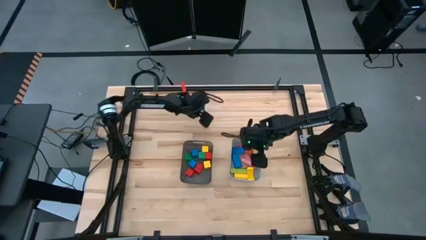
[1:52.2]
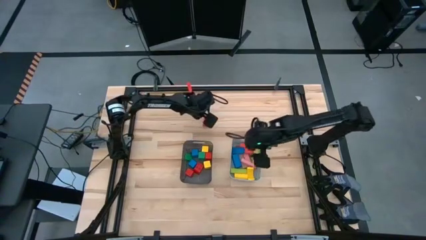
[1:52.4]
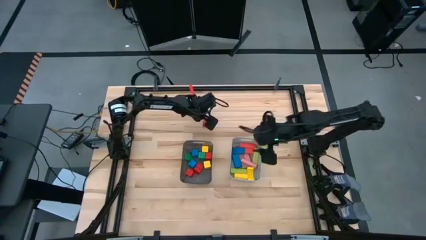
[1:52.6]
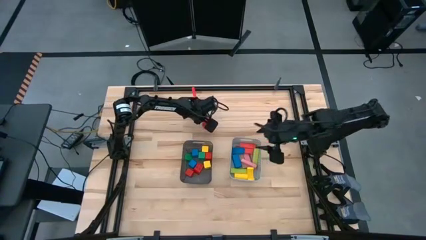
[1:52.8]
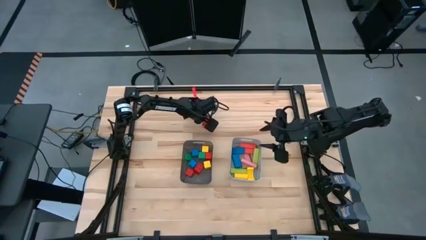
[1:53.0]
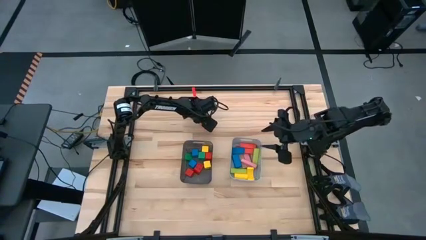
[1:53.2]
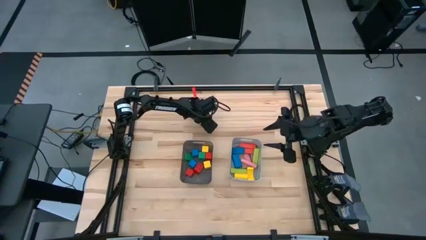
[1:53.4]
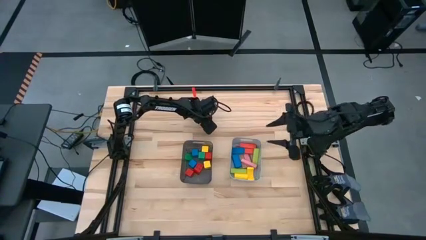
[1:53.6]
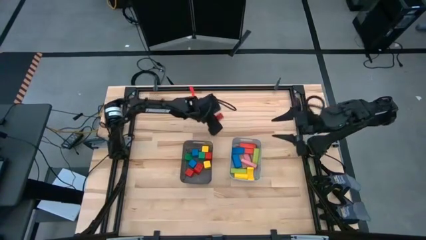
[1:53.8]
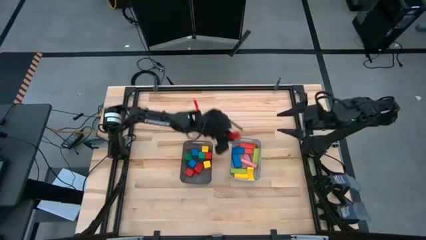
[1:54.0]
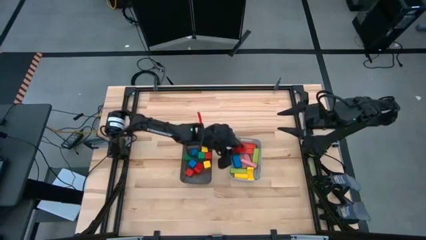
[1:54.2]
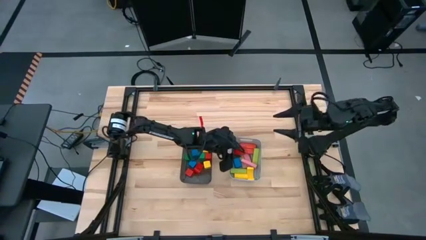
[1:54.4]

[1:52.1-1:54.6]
Task: Sort blocks by size
Put the large red block into the gray bin

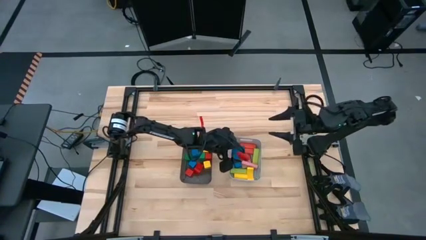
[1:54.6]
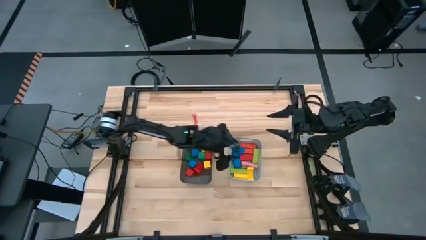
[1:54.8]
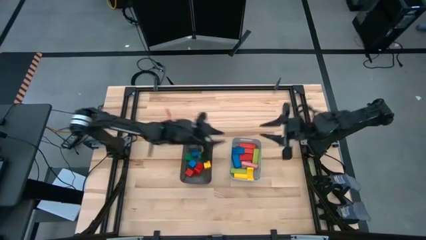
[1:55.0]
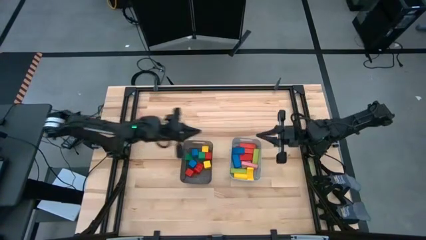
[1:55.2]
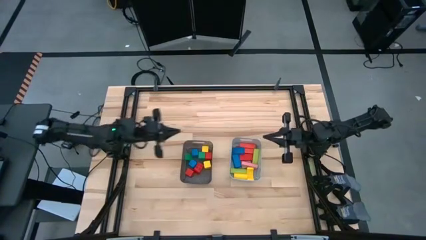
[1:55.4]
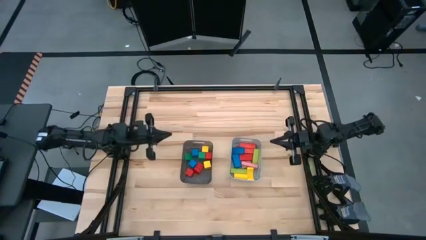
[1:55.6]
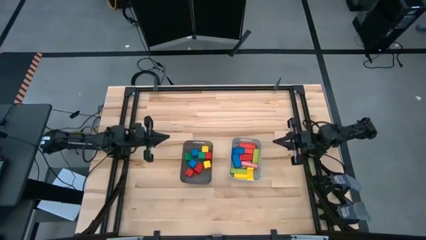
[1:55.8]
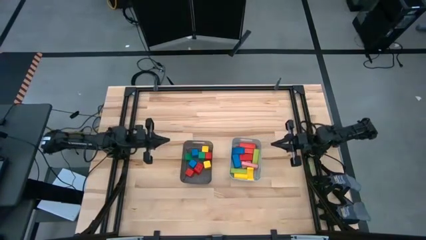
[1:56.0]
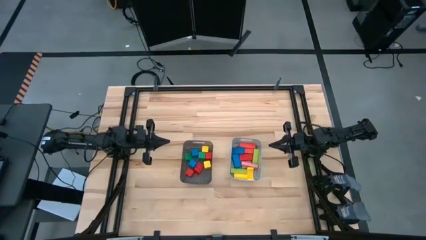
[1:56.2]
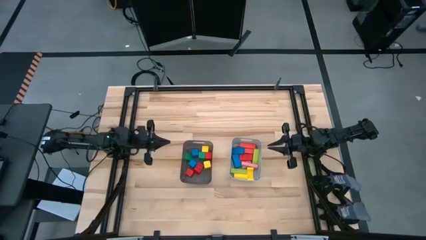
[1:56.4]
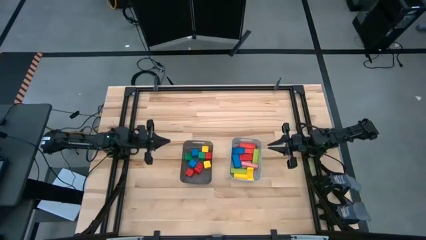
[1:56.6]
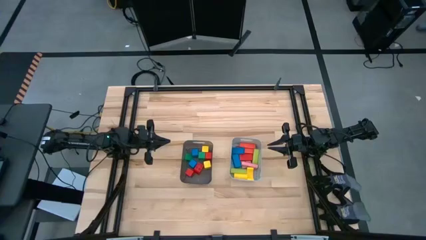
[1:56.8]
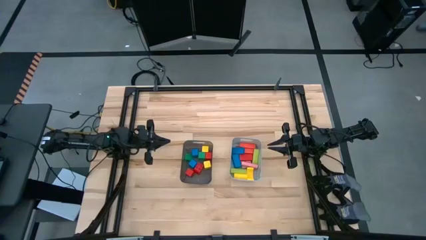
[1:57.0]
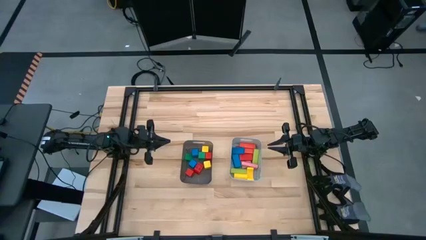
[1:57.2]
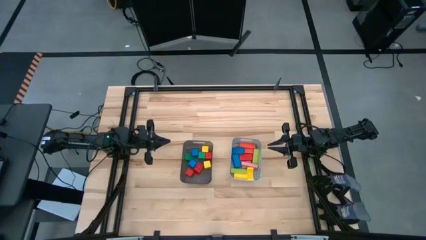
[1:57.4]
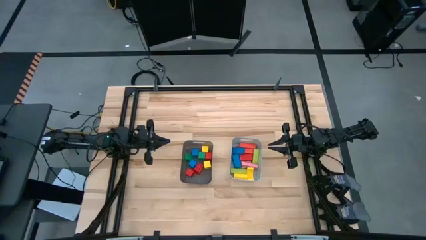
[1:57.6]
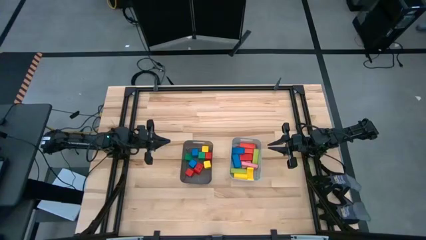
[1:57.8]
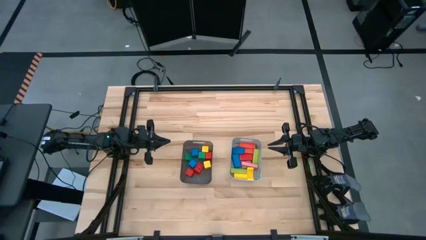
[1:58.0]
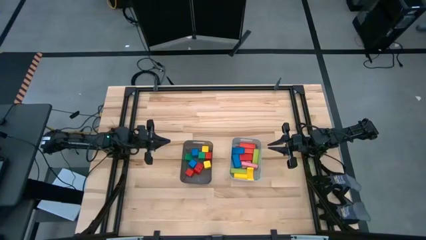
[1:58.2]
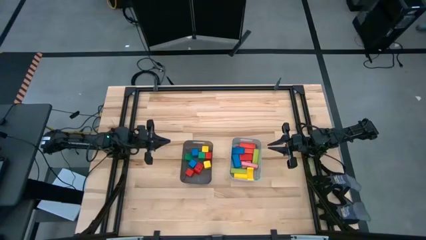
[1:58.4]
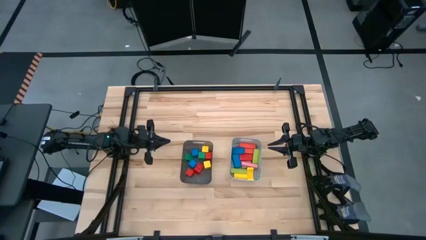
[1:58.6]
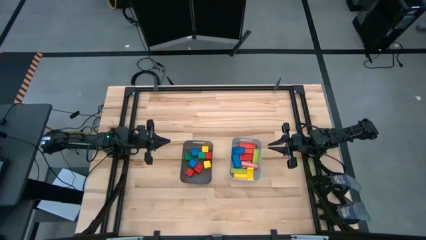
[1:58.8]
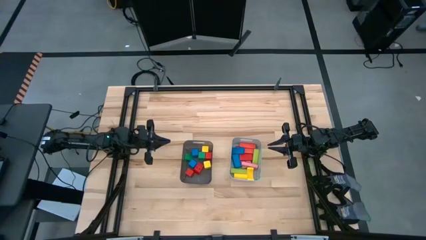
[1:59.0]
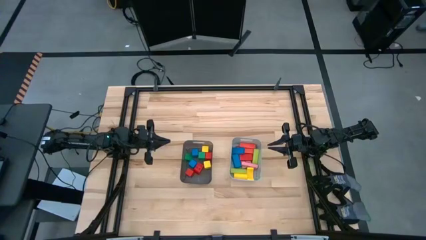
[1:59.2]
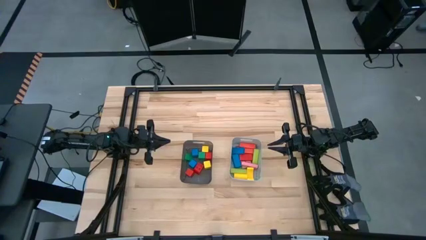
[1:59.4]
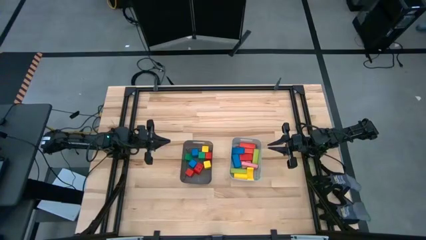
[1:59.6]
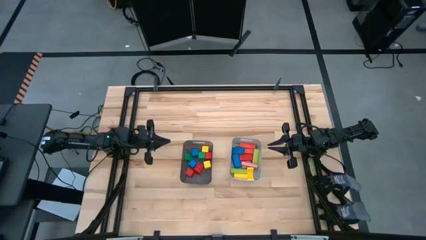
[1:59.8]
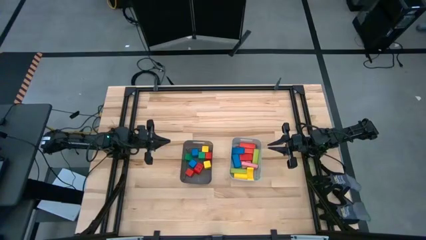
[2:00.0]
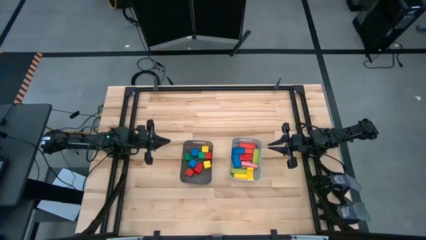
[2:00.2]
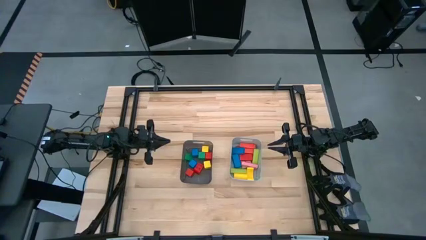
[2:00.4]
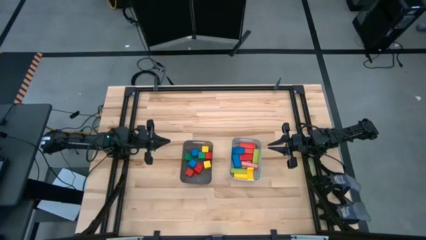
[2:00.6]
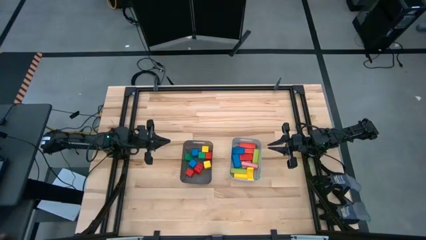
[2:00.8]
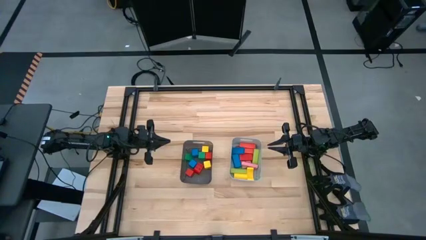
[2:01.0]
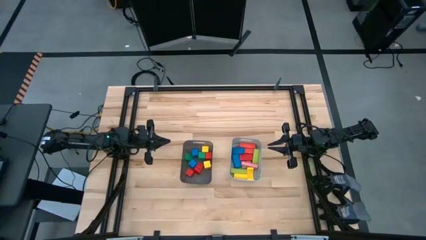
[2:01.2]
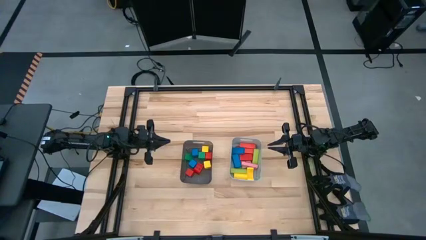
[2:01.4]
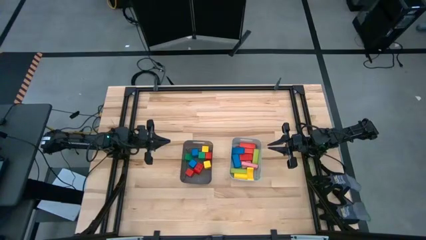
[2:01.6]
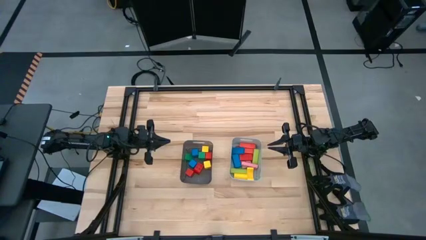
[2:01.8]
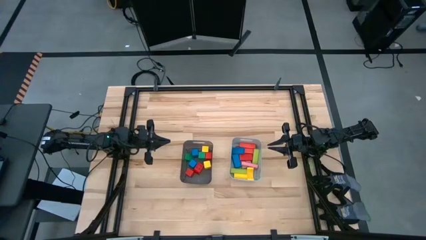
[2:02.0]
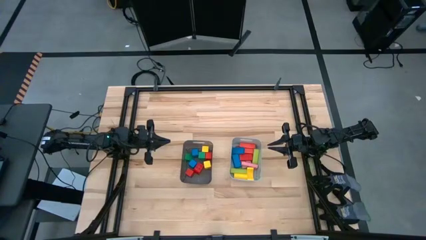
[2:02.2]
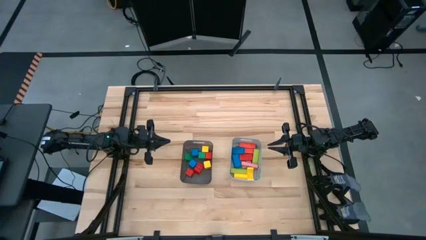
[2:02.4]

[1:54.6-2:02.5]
Return to Home Position

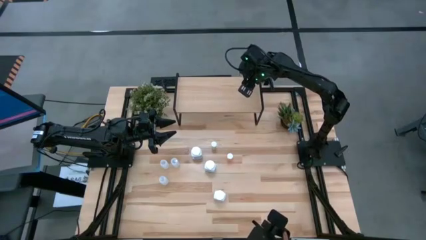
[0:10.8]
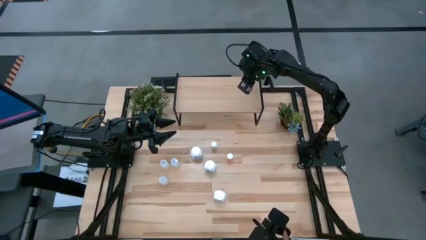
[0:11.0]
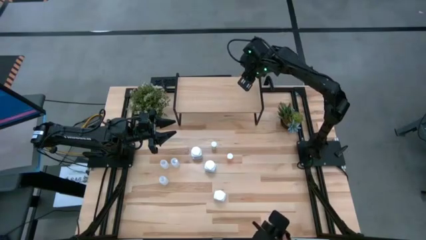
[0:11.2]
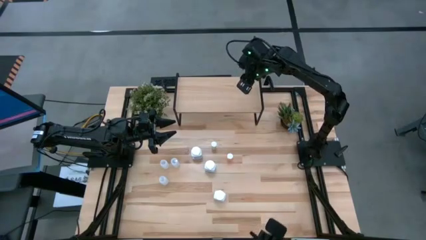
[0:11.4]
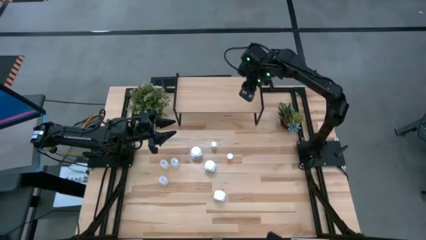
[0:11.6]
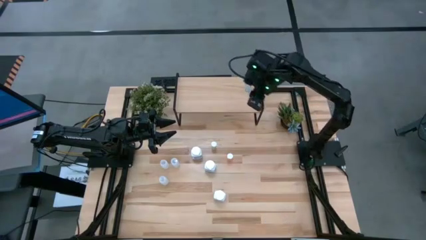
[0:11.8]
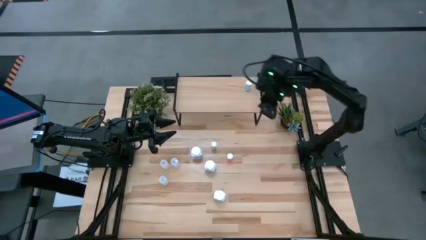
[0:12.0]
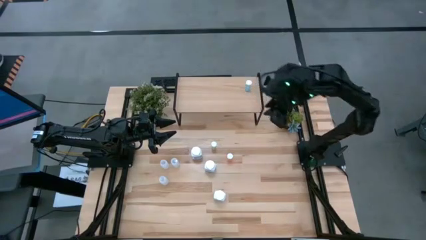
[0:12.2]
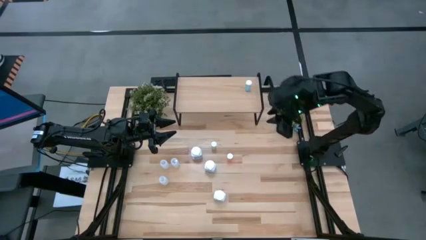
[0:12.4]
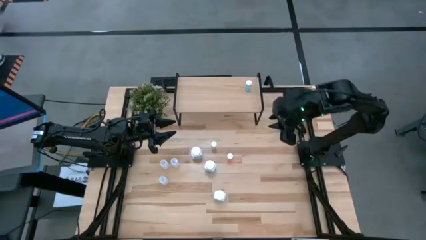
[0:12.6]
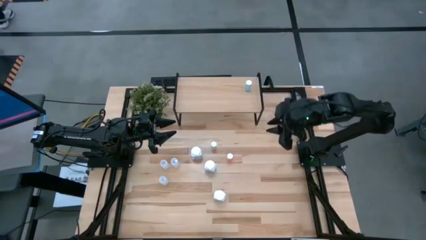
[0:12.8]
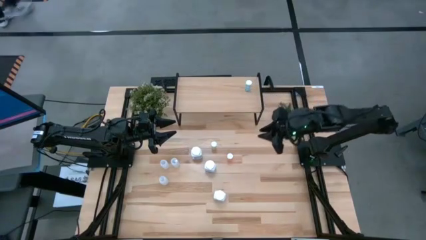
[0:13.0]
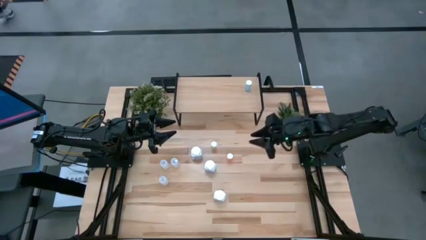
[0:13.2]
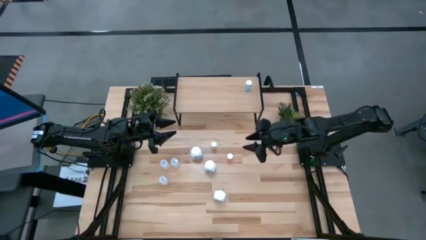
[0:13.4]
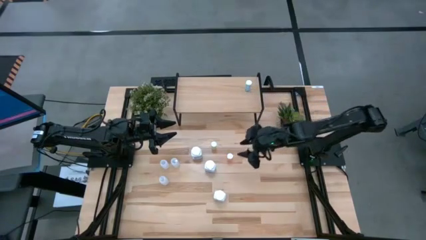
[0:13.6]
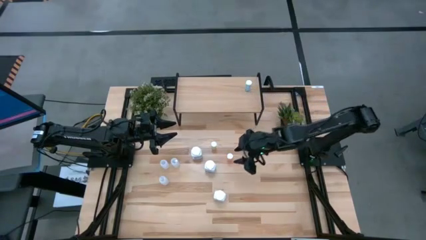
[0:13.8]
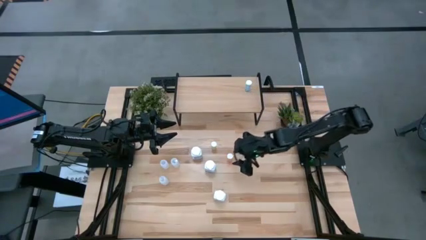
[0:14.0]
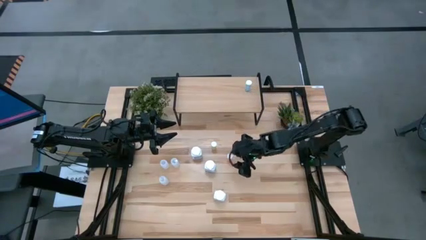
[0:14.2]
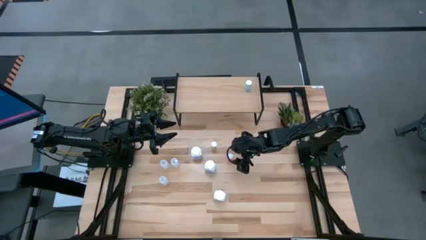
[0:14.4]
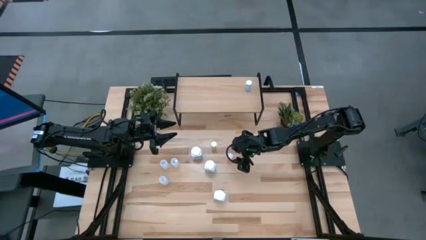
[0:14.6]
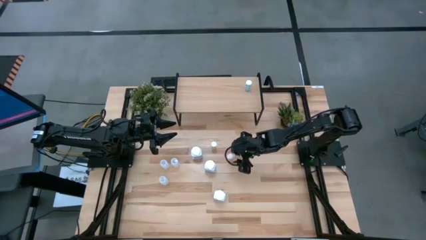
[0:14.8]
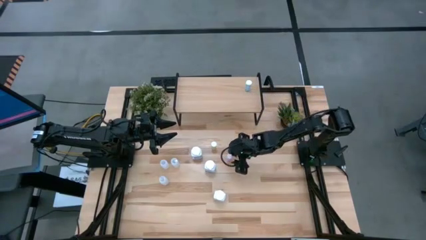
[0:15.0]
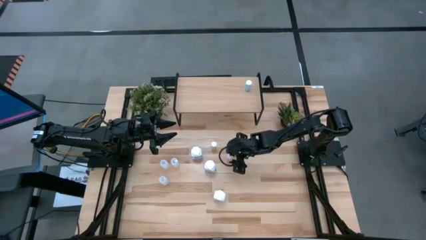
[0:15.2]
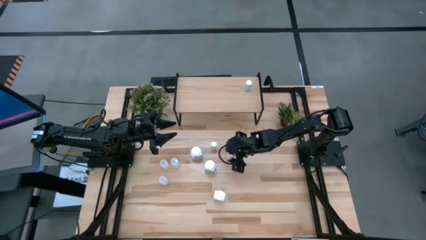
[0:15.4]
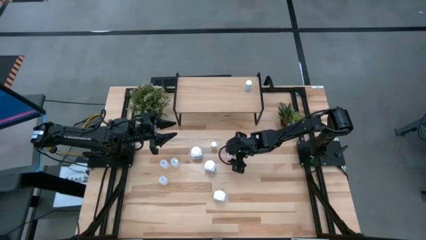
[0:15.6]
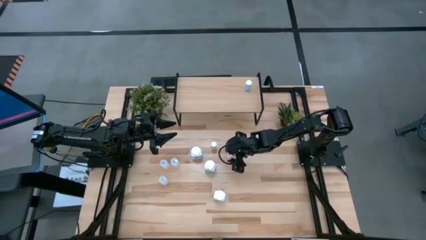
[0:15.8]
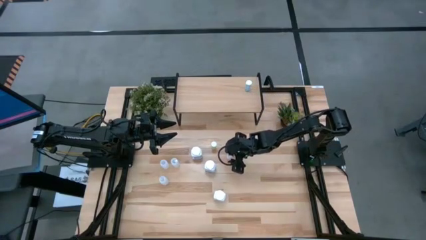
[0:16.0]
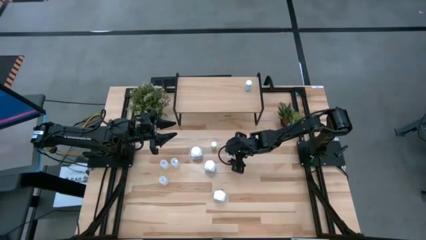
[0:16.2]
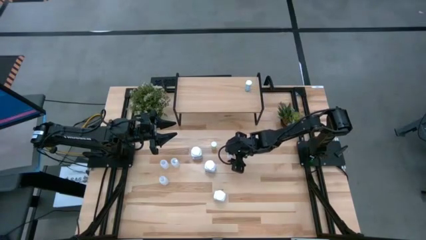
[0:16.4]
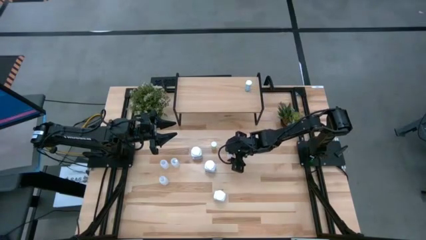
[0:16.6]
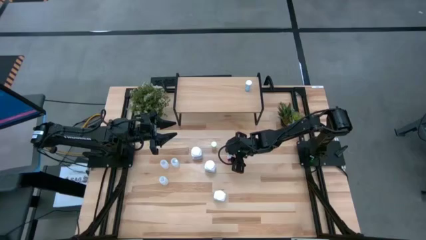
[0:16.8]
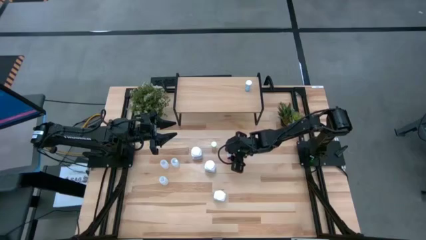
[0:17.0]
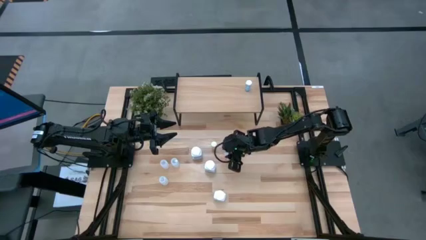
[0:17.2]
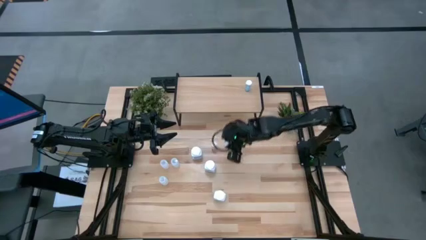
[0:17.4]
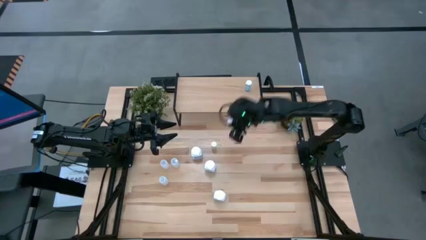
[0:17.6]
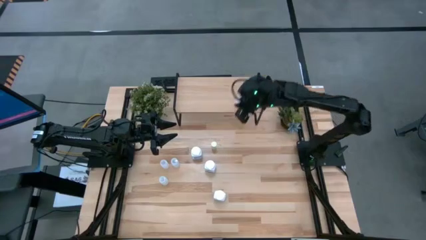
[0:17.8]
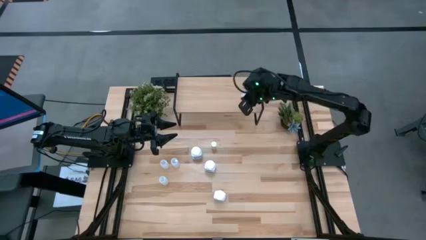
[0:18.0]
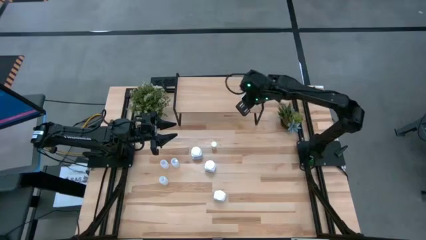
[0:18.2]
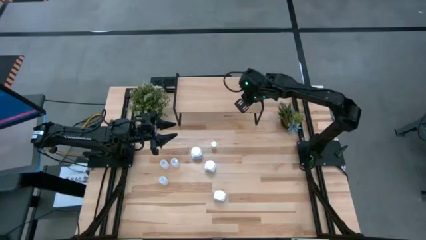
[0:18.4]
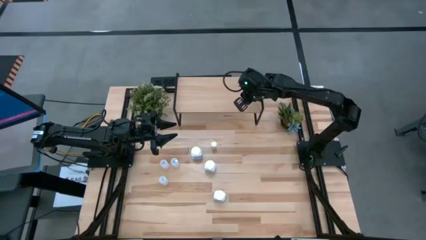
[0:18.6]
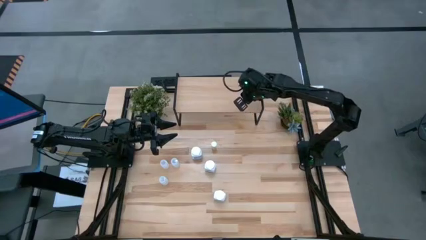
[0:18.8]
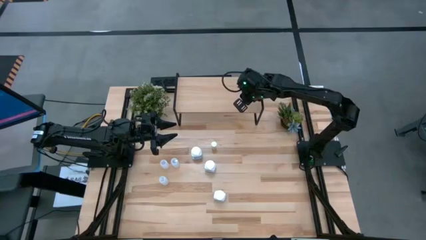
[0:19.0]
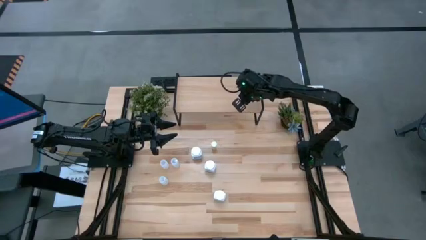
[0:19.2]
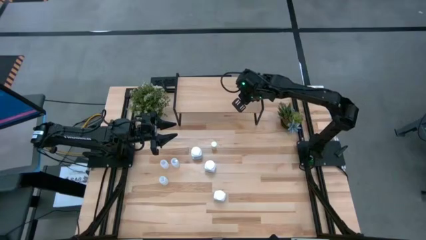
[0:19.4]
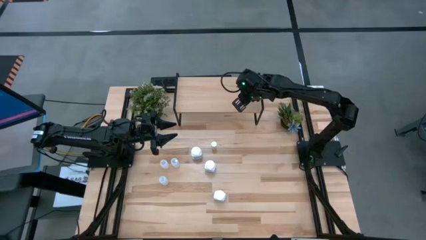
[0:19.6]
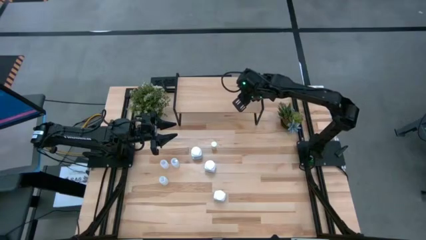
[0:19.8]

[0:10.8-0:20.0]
Task: Pick and place medicine bottles onto shelf by color
Put the red pill bottle on the shelf
